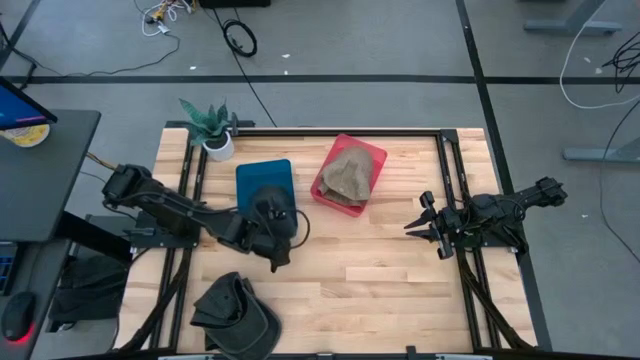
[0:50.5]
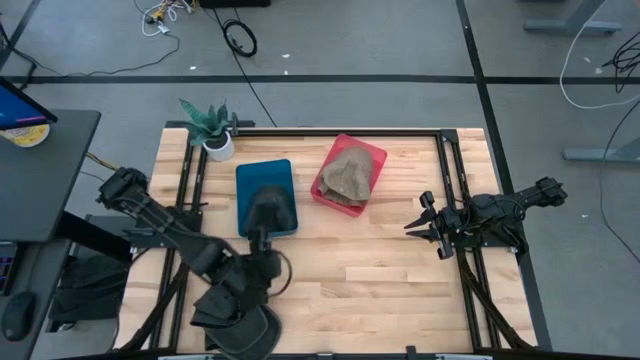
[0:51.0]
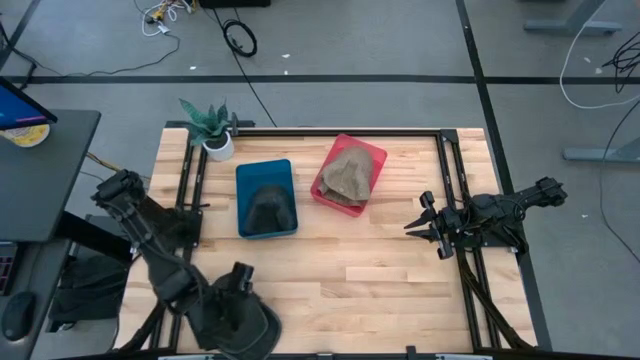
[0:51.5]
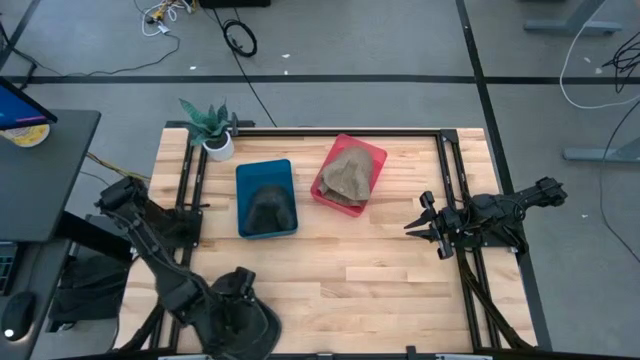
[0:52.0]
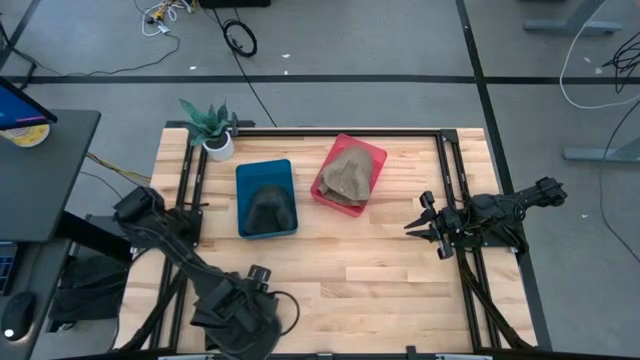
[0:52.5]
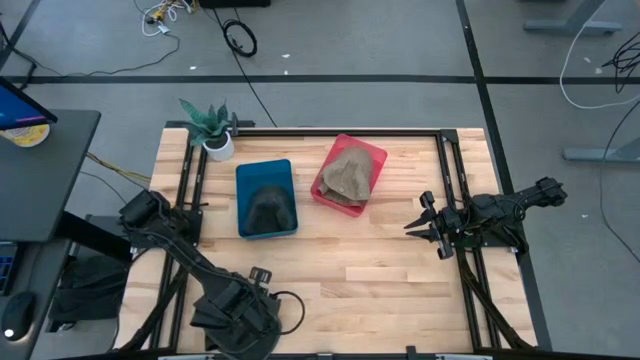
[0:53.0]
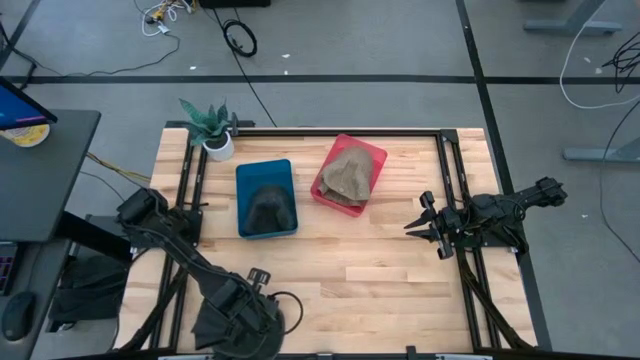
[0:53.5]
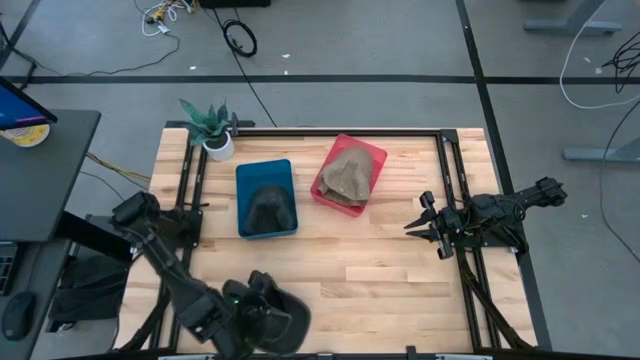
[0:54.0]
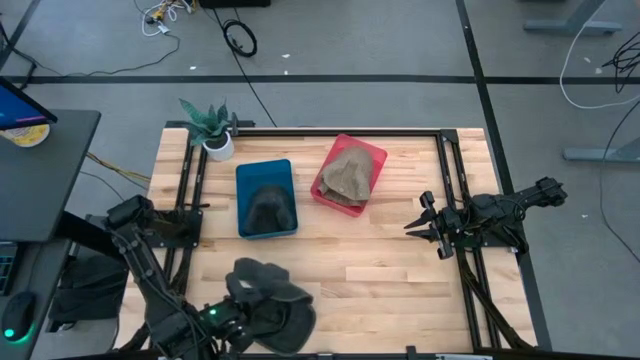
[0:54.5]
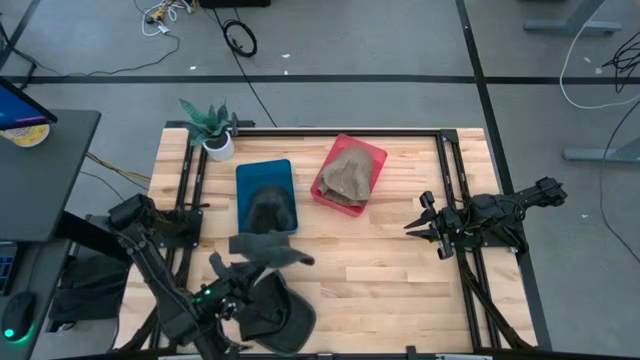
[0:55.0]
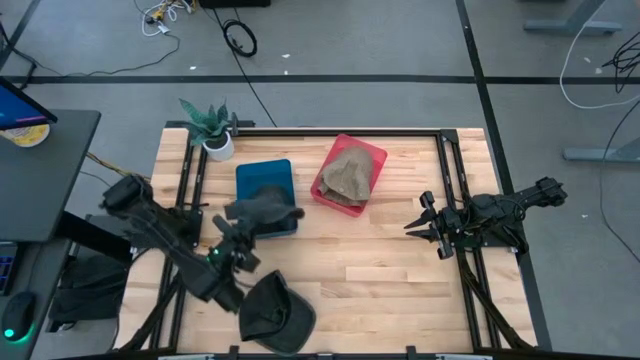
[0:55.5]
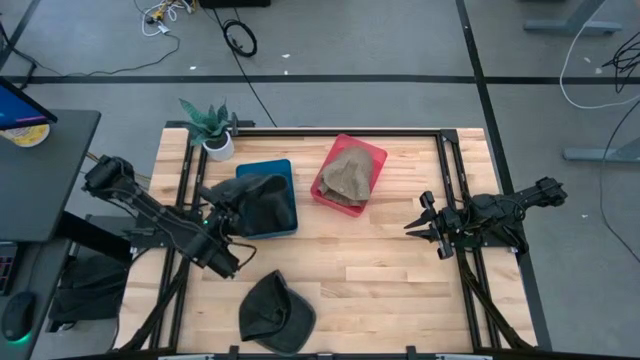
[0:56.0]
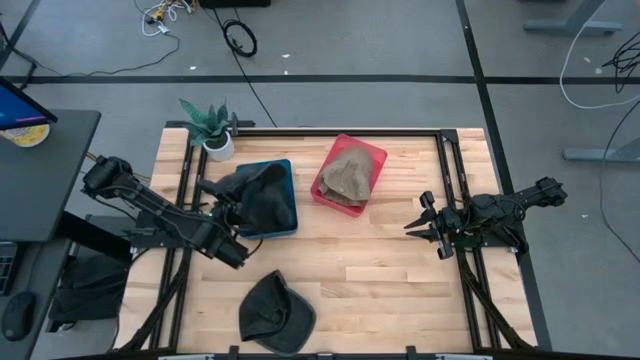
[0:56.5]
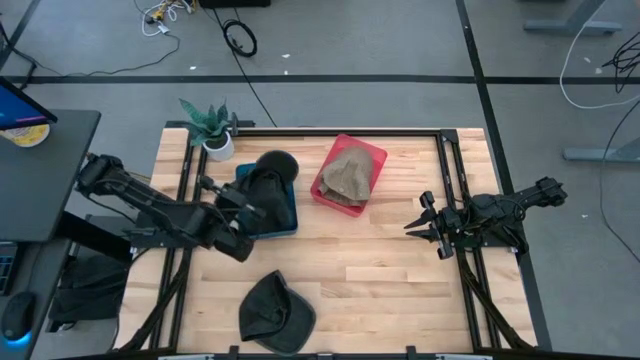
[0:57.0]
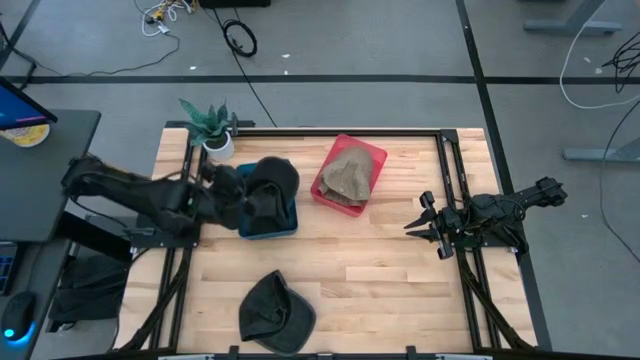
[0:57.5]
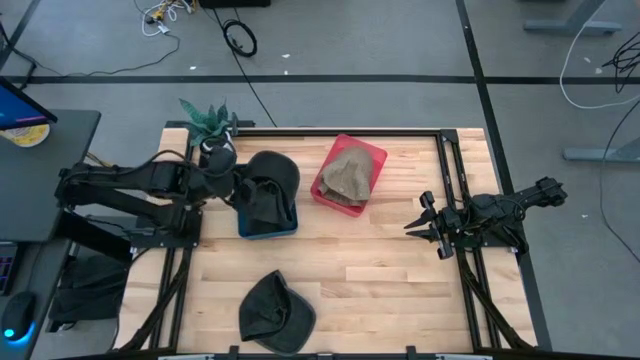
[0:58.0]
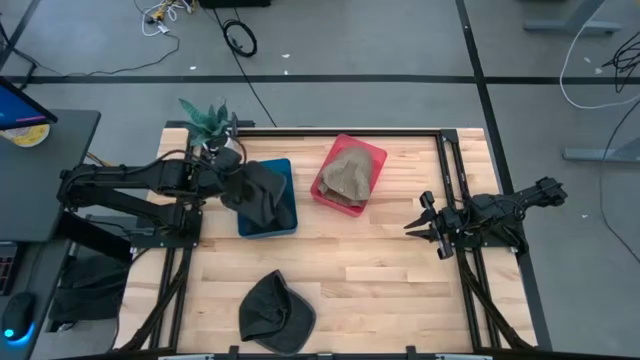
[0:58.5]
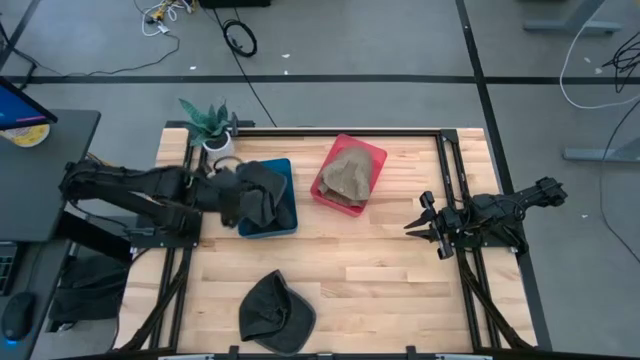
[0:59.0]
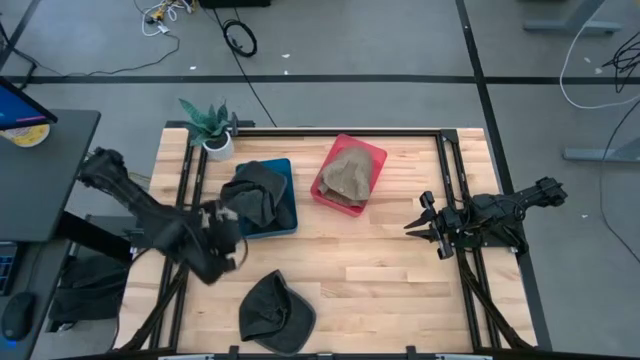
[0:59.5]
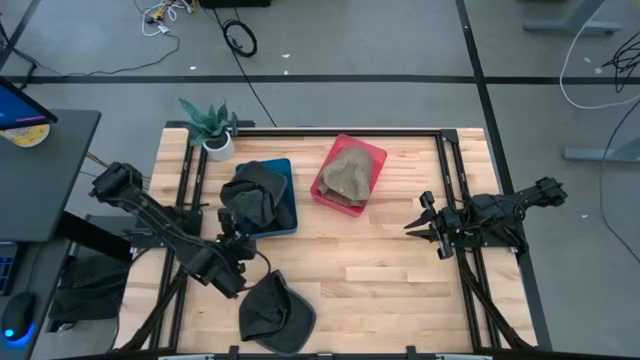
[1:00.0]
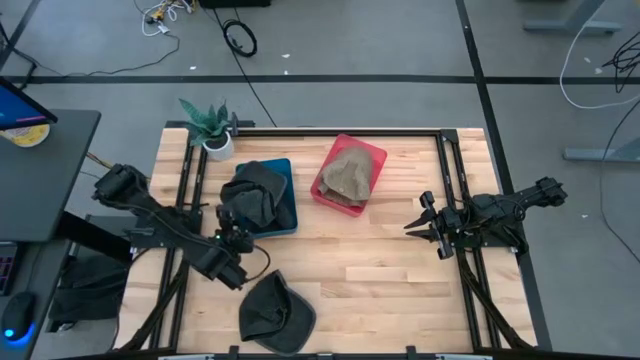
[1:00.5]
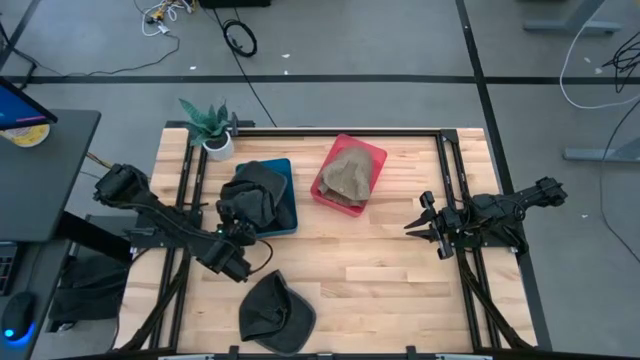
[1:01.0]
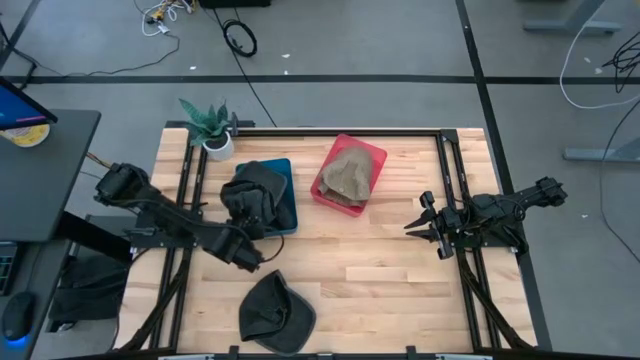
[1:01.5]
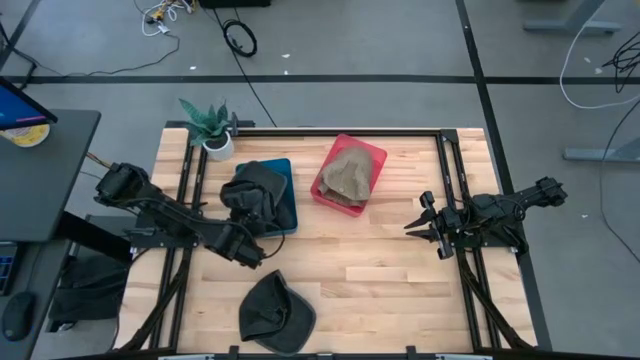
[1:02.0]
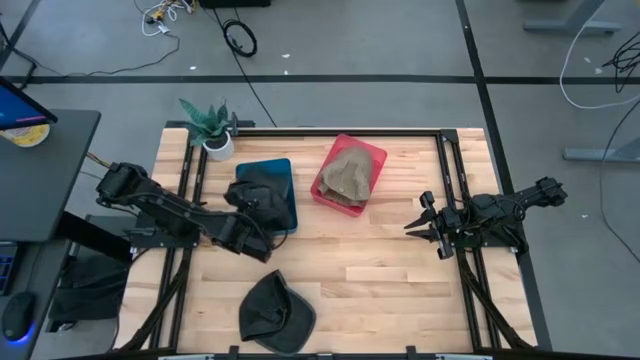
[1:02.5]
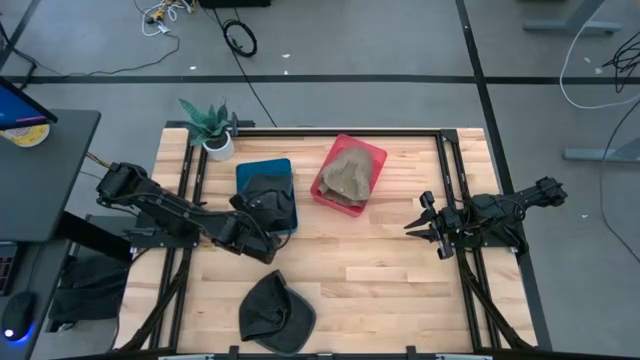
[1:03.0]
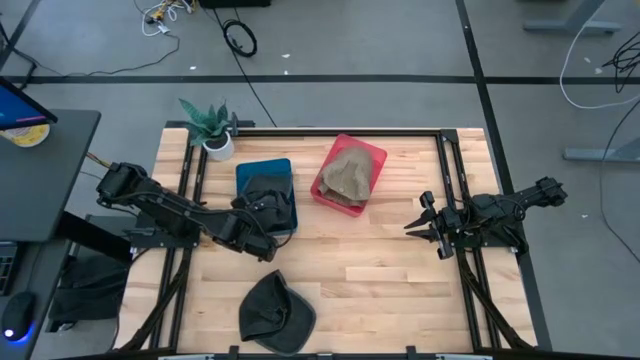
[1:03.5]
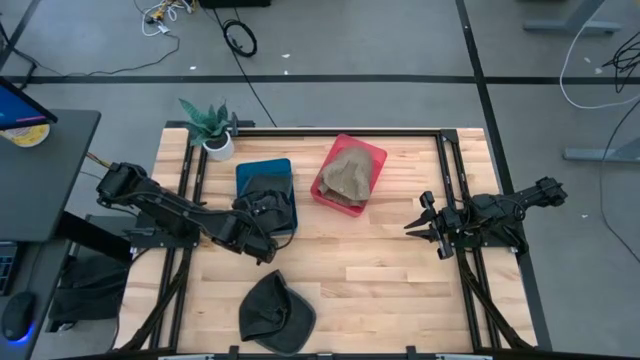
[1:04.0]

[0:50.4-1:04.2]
Task: Pick & Place hat
Put the top black cap into the blue bin
